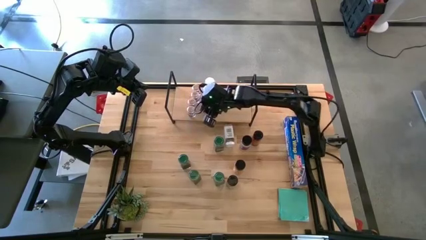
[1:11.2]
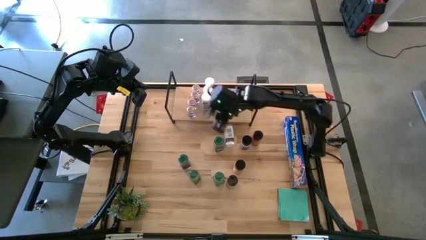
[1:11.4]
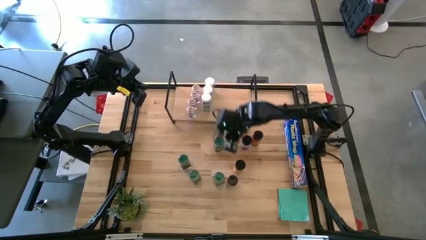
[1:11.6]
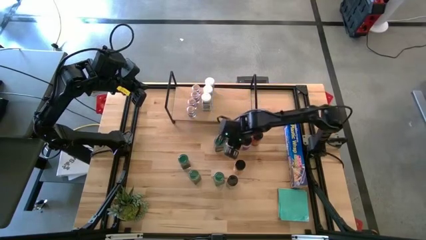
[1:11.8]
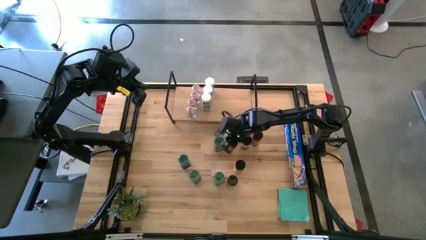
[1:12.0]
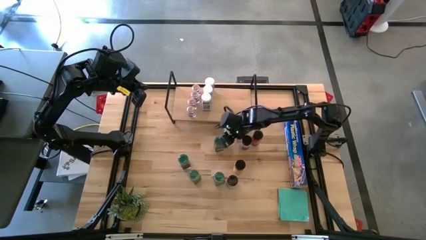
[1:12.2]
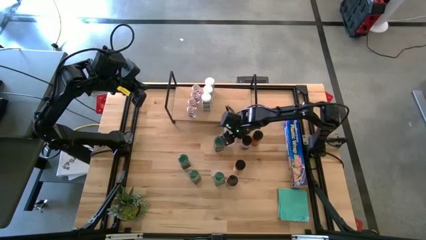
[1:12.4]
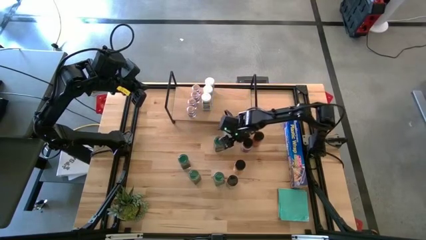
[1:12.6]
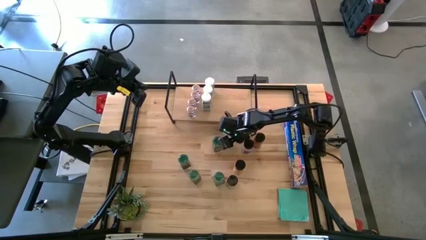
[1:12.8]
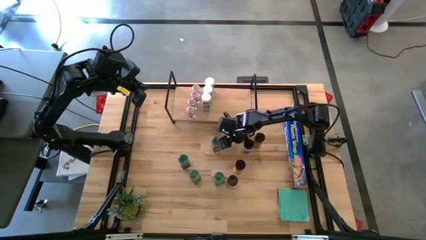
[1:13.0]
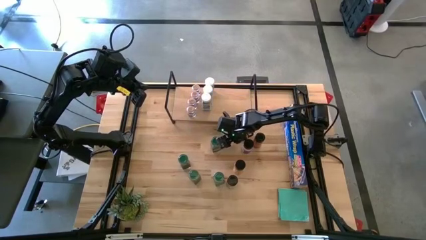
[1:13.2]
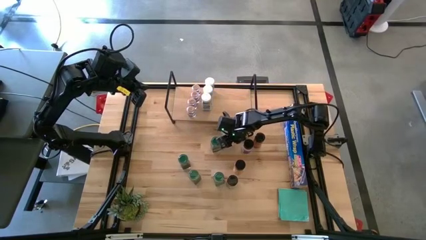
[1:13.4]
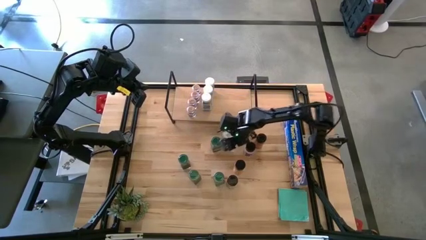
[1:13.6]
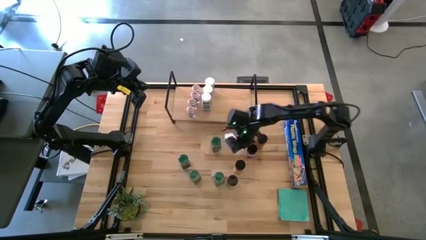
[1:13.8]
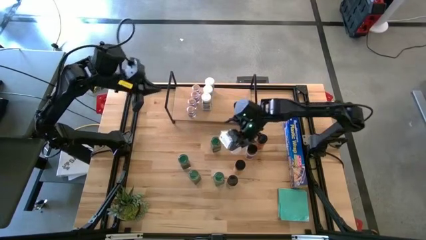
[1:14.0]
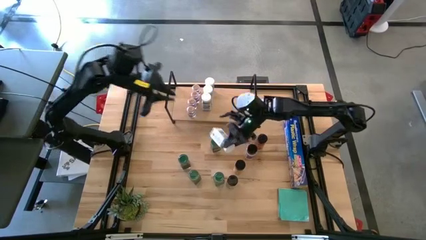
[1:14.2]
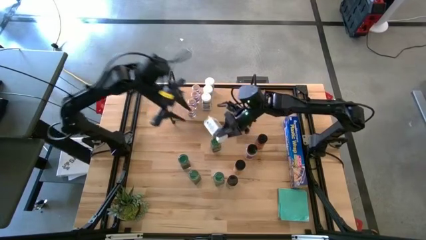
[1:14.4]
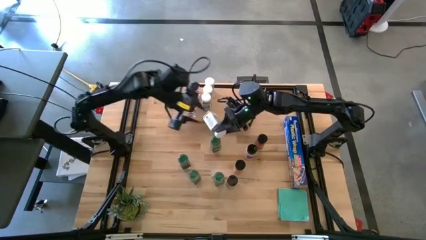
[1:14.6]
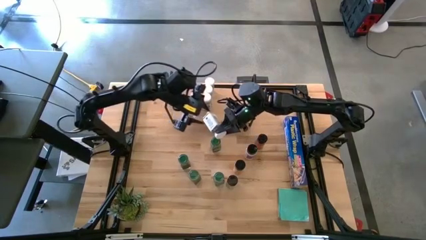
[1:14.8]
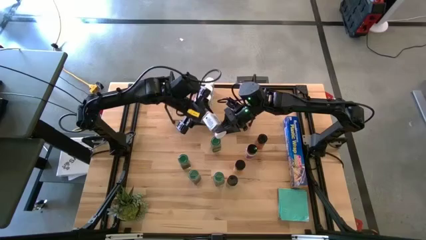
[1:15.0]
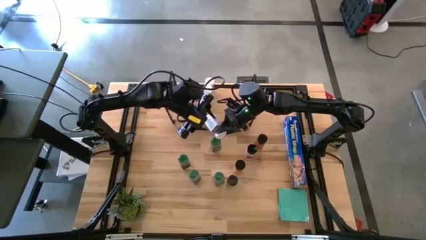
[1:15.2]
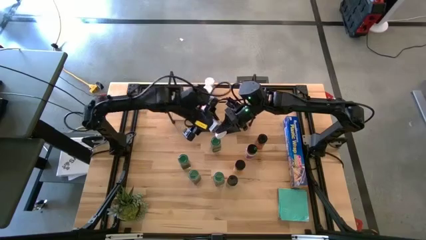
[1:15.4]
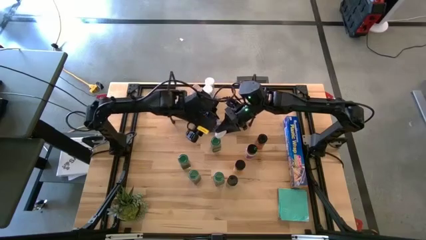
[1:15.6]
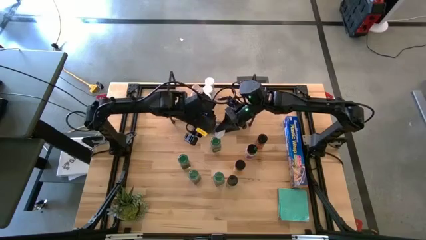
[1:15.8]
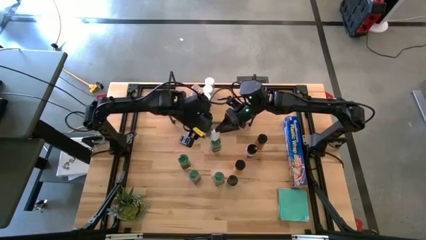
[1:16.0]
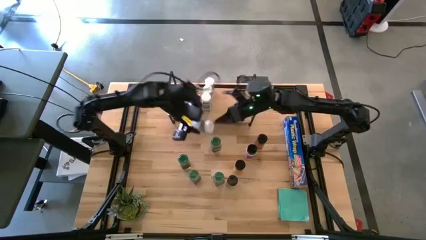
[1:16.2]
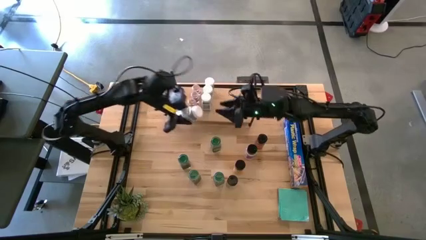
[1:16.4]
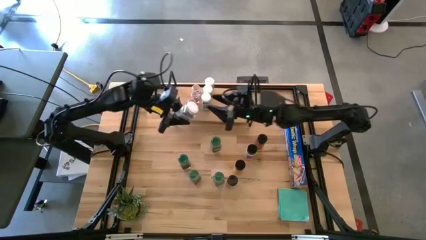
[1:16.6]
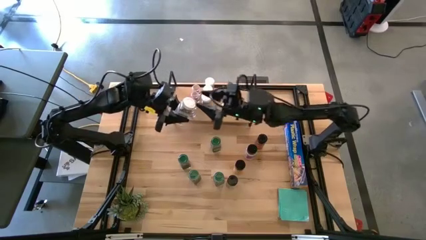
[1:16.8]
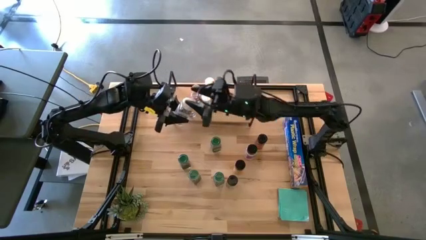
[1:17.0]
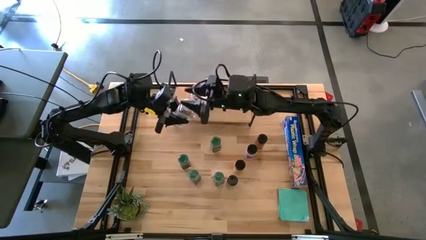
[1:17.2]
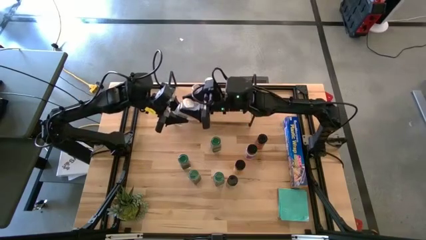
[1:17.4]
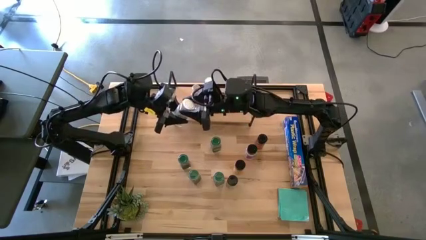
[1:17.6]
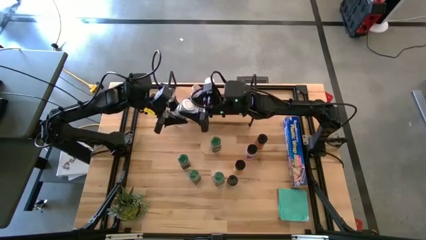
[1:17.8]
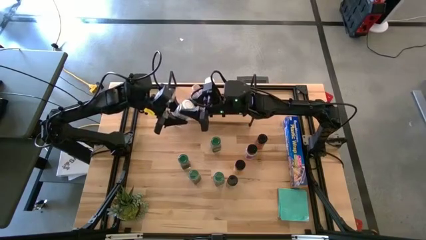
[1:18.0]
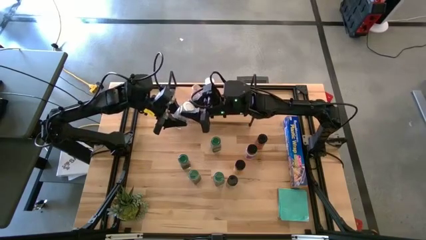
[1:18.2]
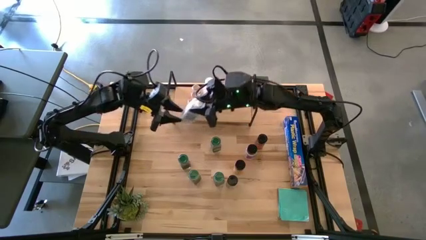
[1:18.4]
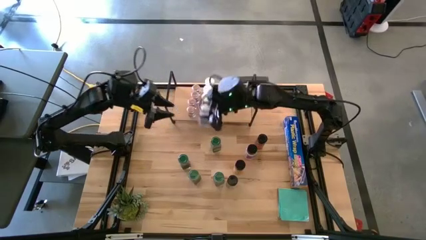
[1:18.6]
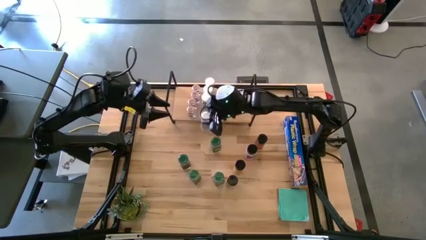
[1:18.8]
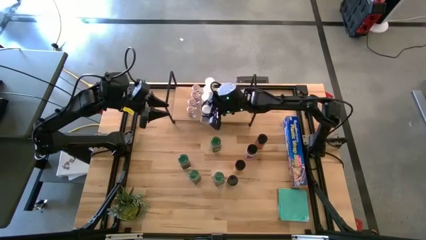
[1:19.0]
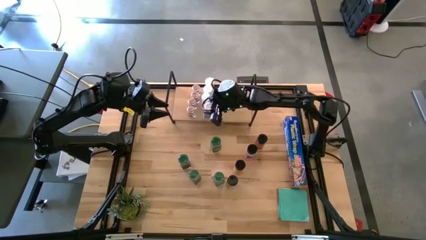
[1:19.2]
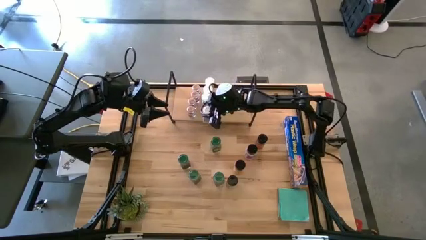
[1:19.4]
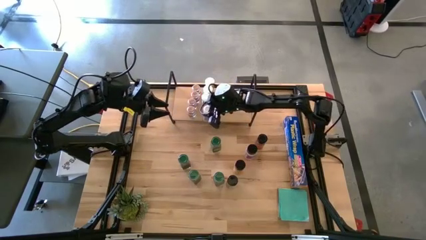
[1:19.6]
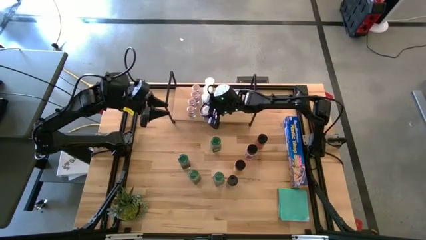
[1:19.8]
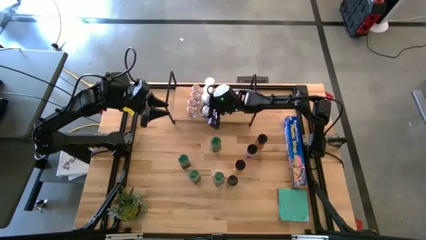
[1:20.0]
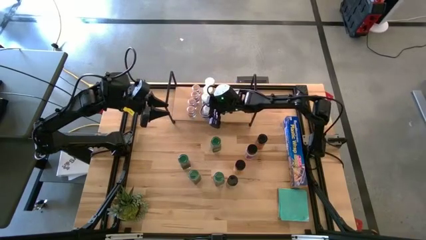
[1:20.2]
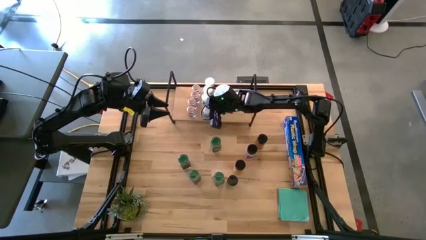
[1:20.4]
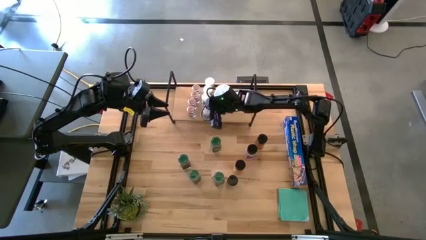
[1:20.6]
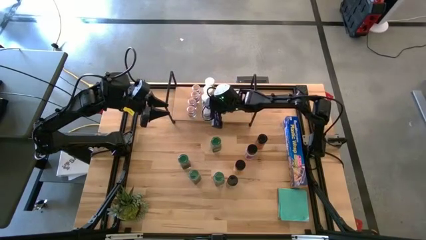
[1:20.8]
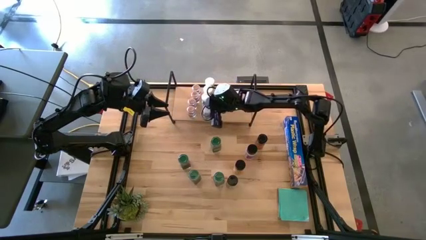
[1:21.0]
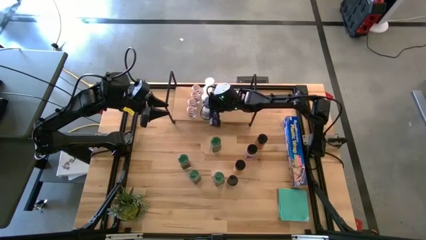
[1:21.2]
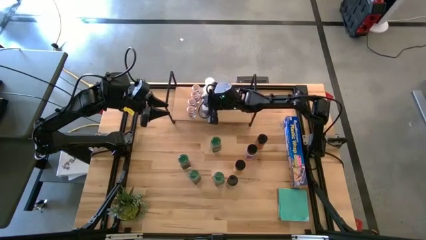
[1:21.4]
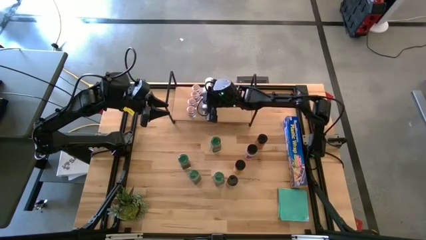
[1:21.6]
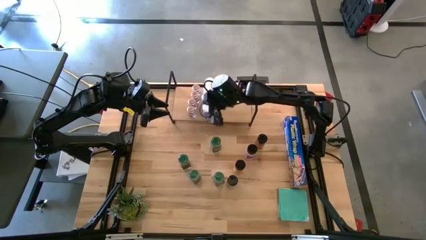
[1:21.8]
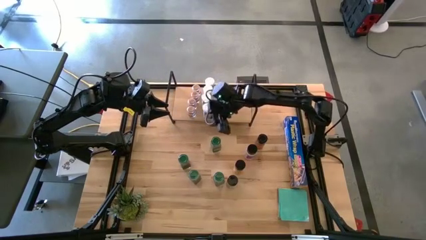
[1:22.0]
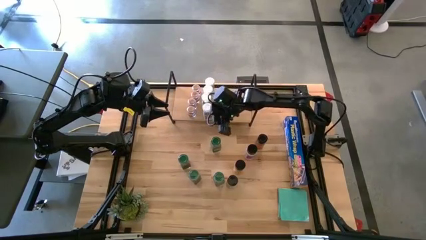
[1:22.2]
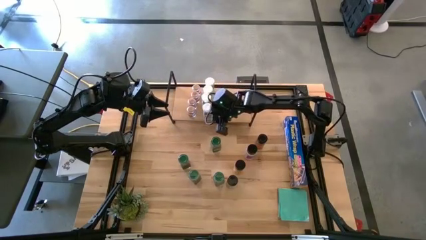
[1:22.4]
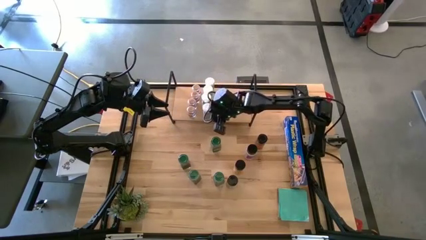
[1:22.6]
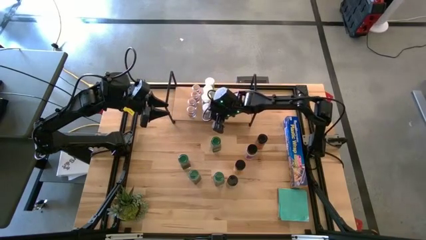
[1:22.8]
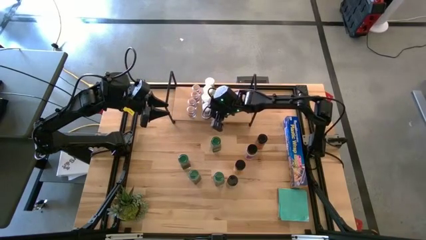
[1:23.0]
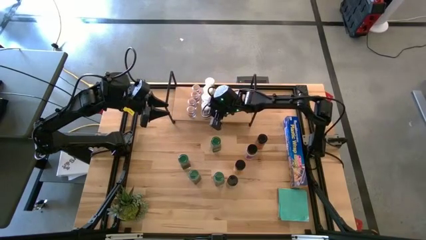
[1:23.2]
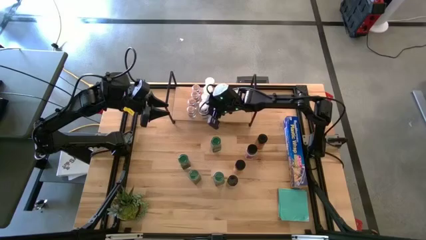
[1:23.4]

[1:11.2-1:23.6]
Task: Shelf spices
Put the white seasoning bottle on the shelf aligned with the other white seasoning bottle

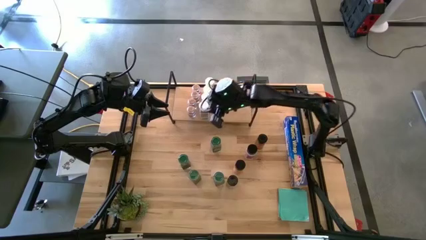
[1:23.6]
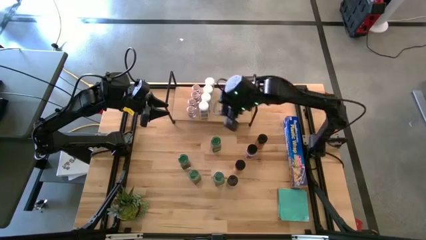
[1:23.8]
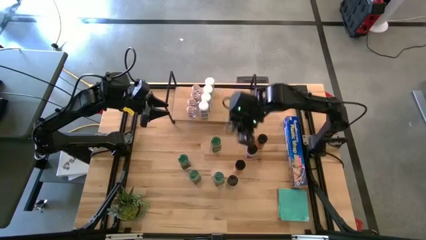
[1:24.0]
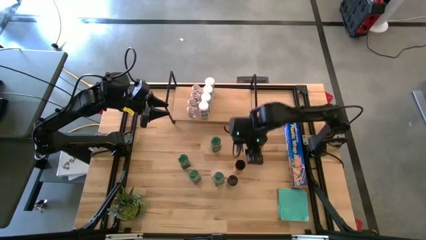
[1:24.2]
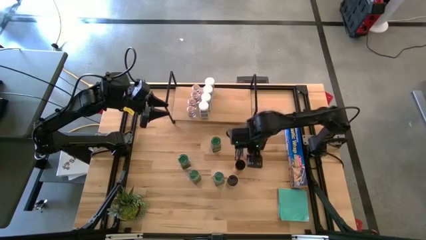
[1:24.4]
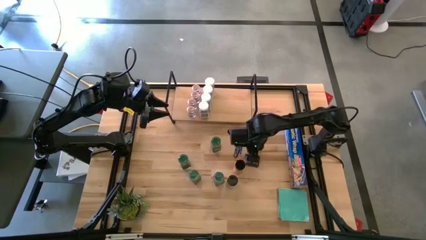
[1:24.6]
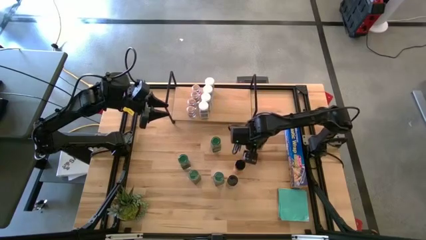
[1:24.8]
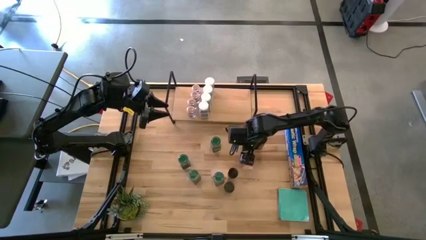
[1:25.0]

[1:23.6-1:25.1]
Put the top middle black seasoning bottle on the shelf

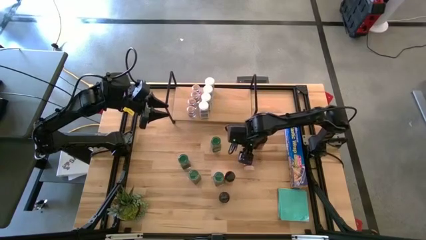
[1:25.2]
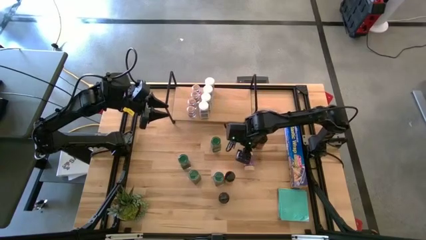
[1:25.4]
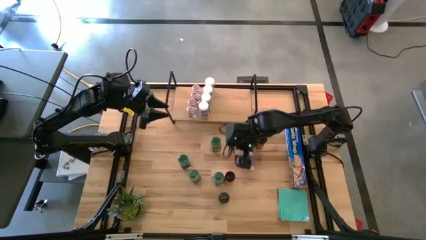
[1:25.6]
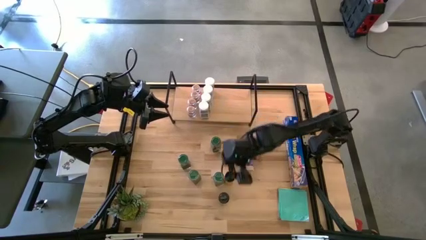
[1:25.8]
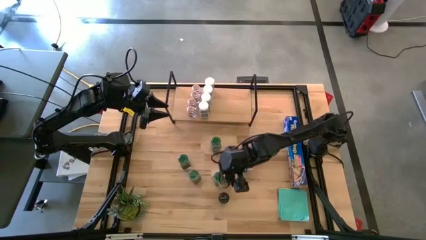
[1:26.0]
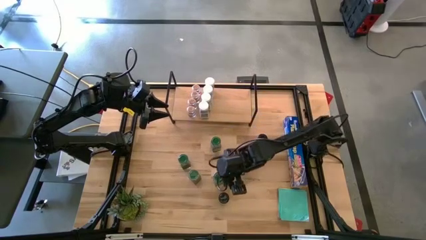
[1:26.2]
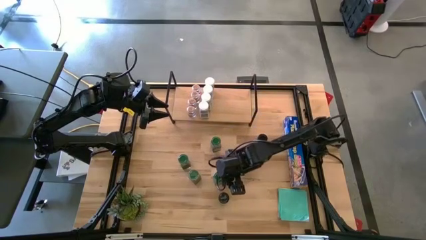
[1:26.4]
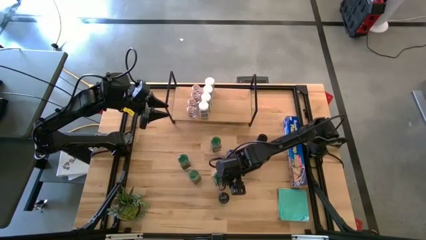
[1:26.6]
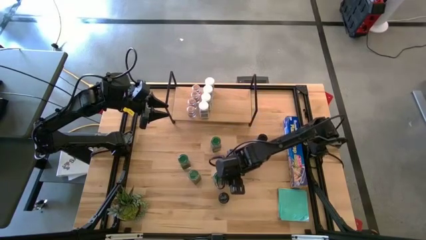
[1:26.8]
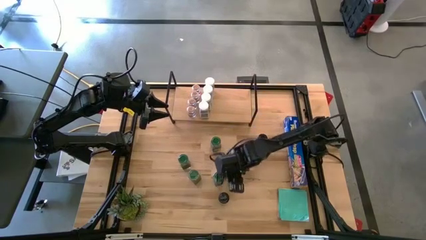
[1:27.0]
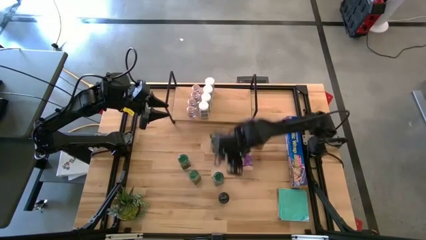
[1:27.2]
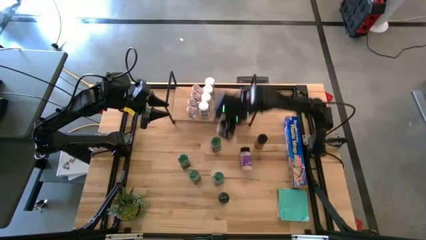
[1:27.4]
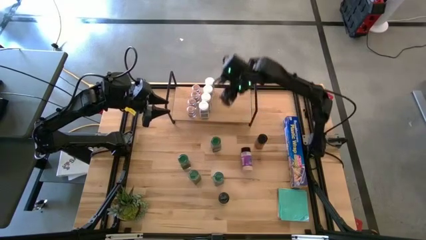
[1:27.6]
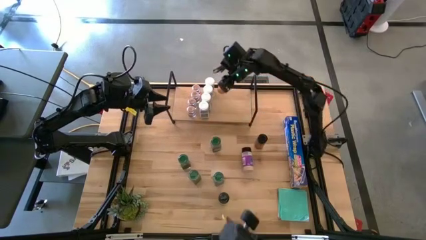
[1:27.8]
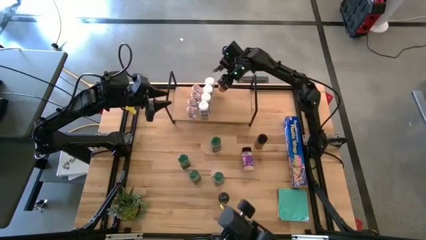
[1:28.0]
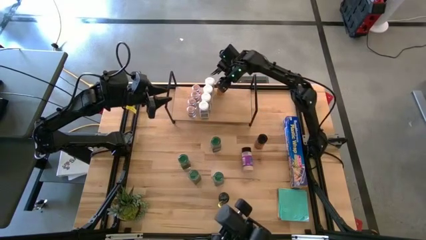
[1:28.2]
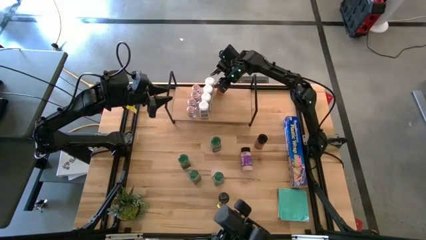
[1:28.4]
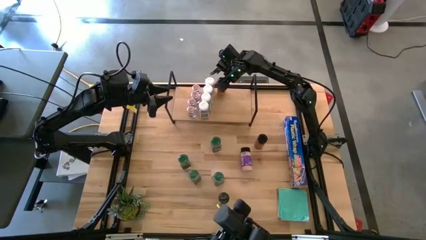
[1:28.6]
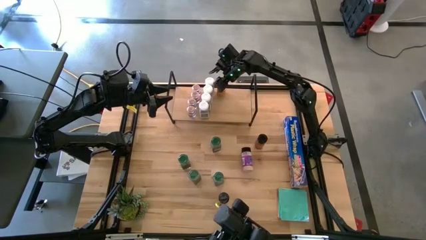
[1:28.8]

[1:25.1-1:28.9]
Put the middle left black seasoning bottle on the shelf
